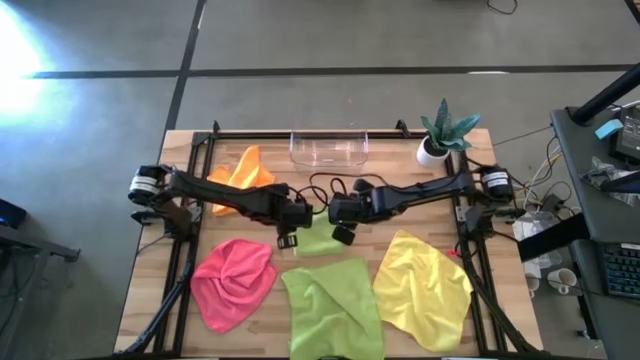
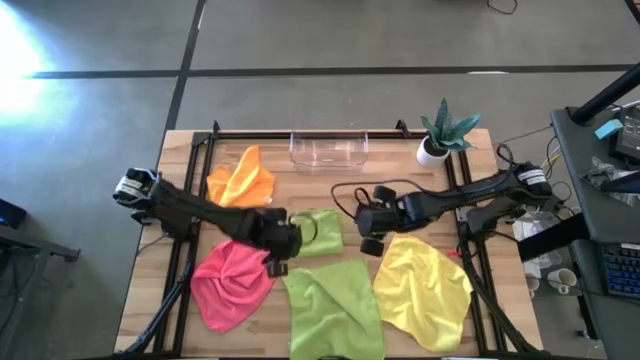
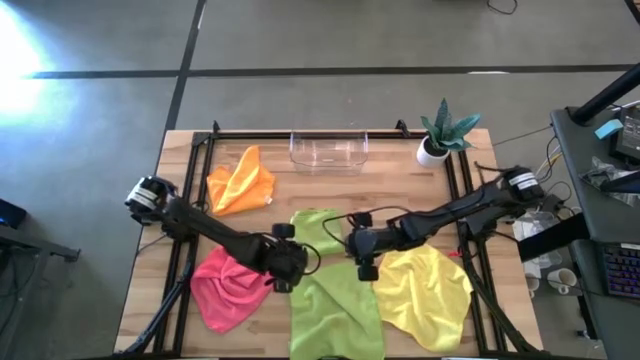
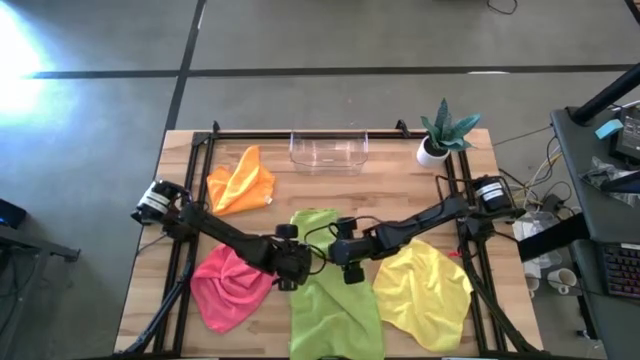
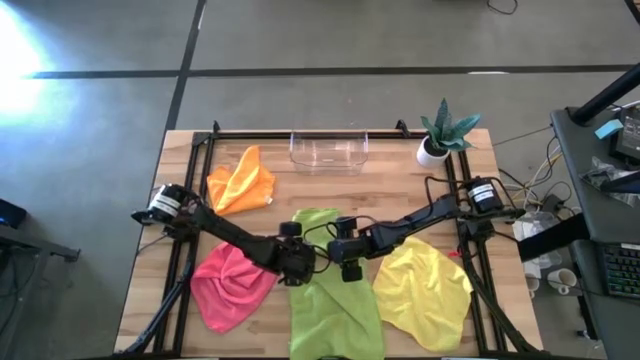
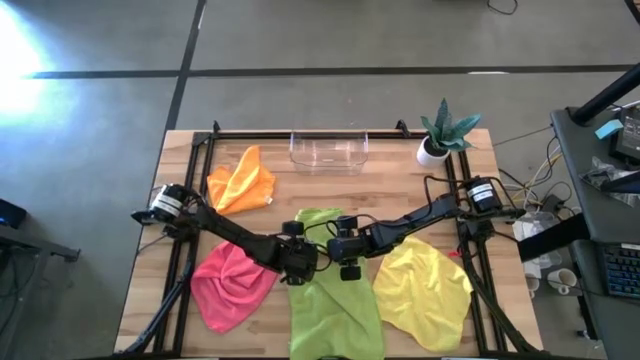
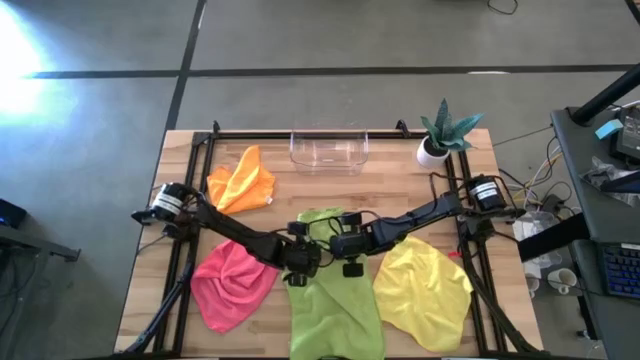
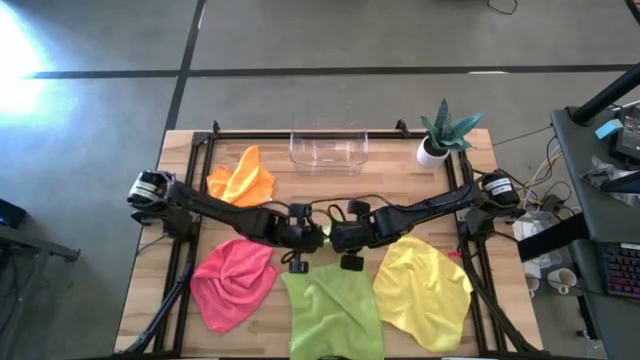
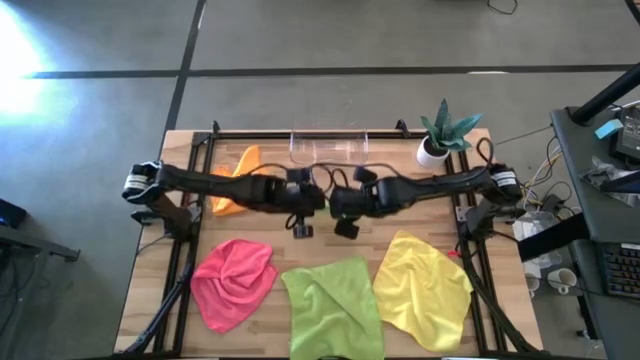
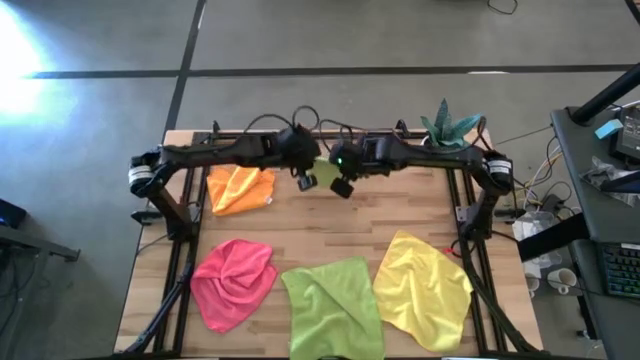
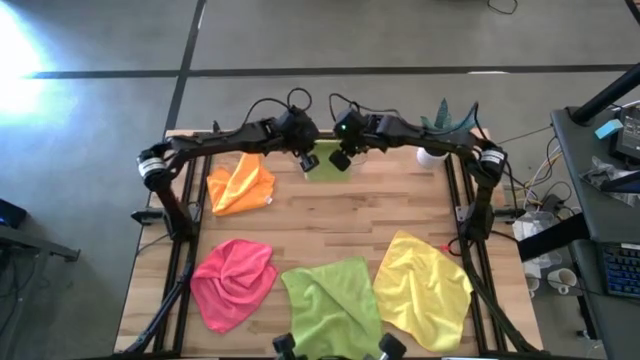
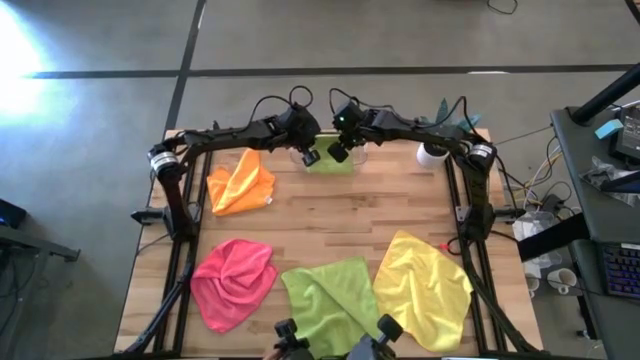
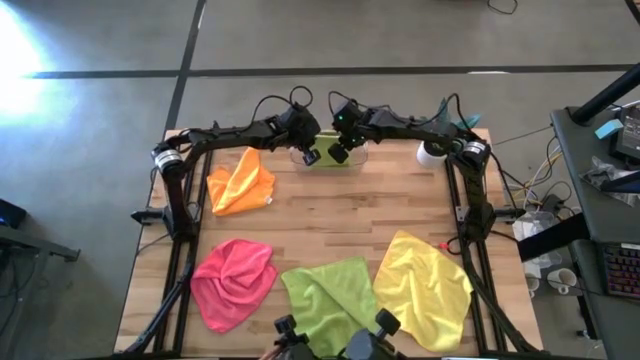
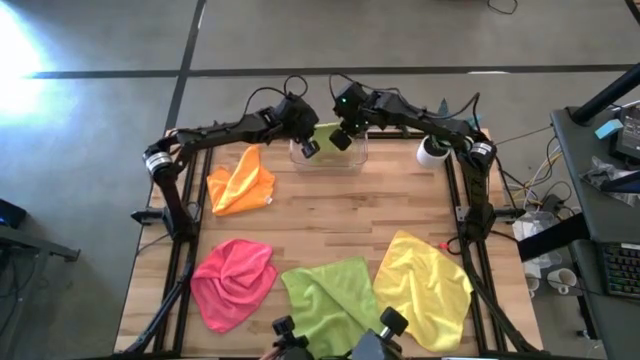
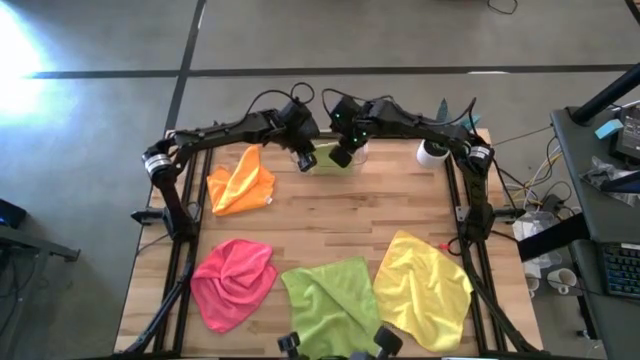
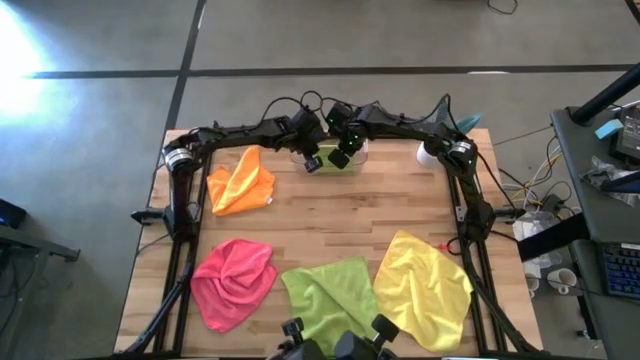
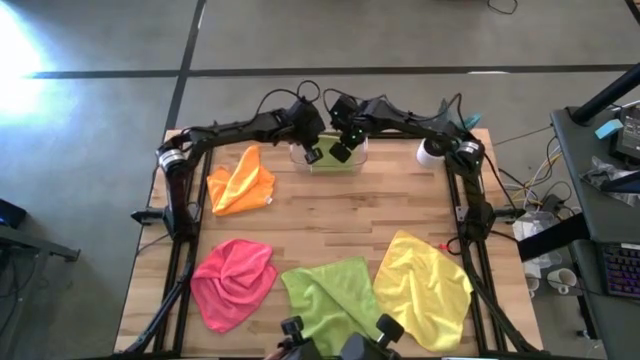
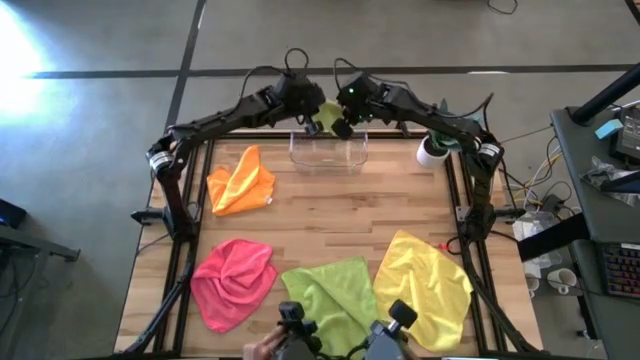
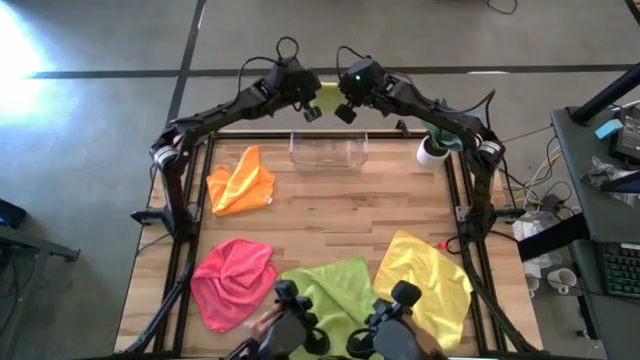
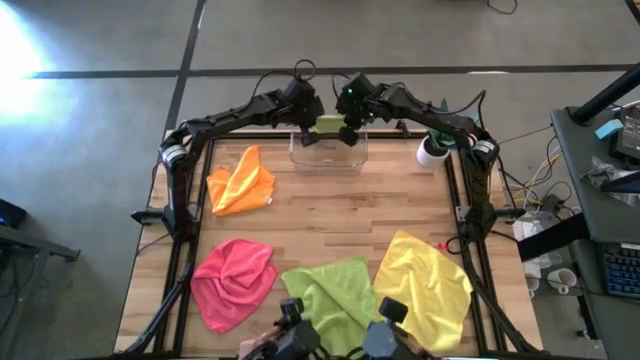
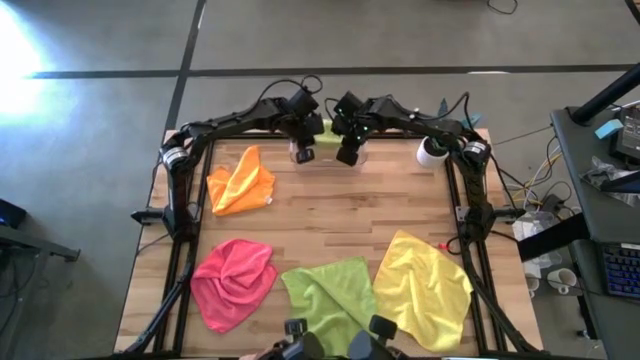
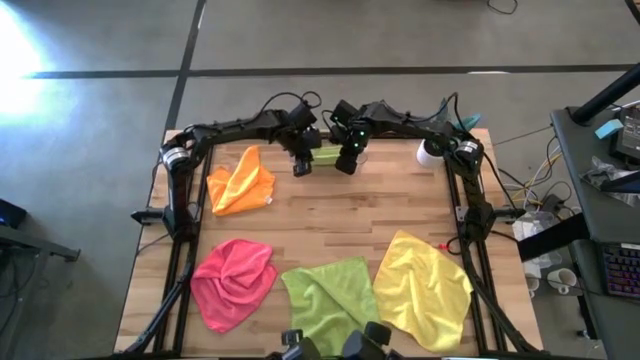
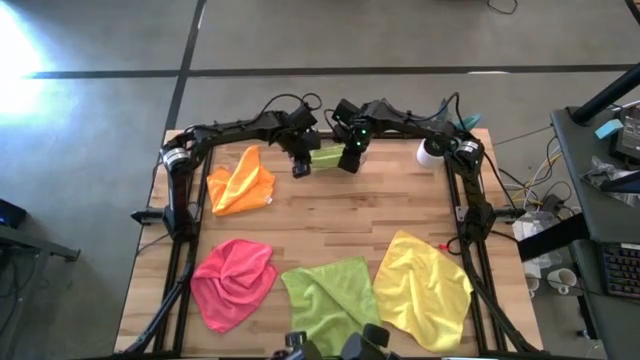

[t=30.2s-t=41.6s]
Task: Fold microfiber towels
Put the top green microfiber towel into the transparent bin

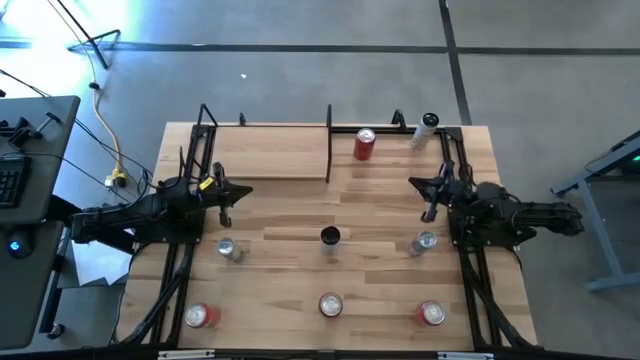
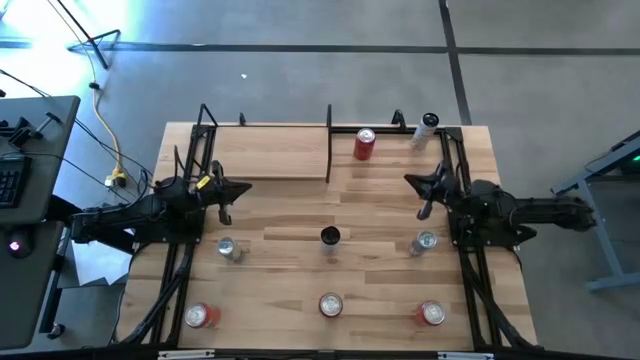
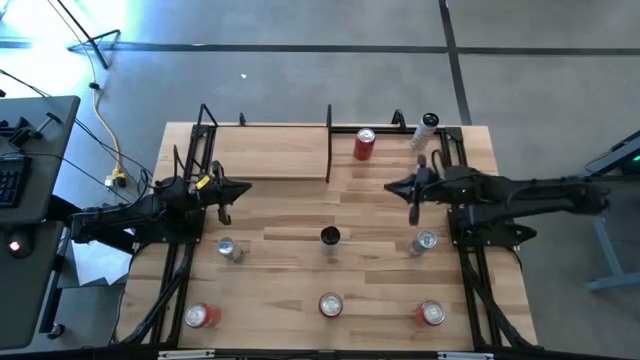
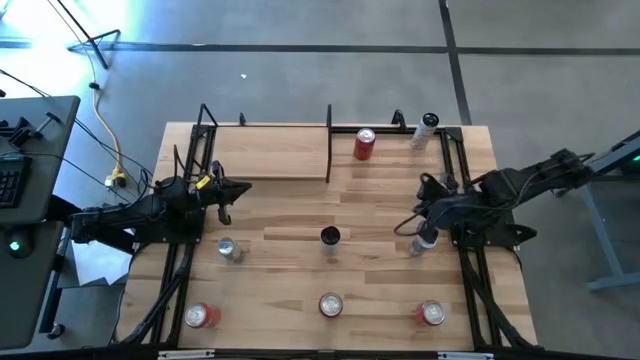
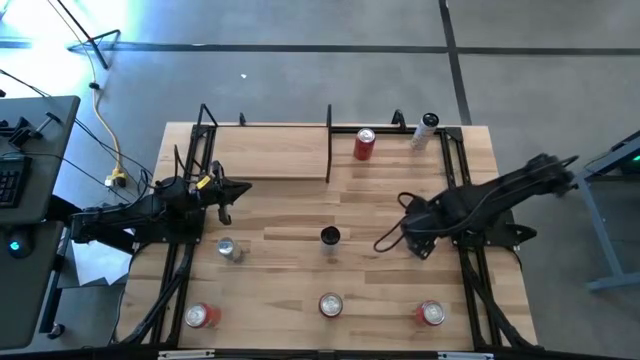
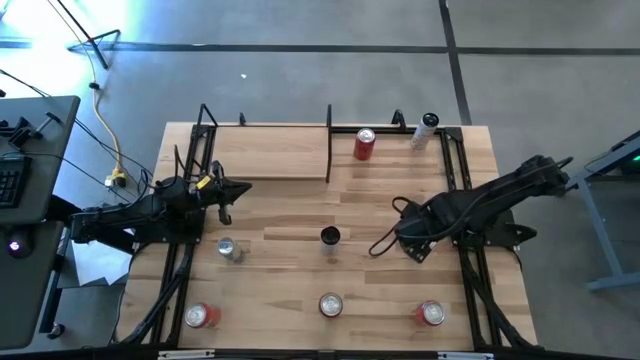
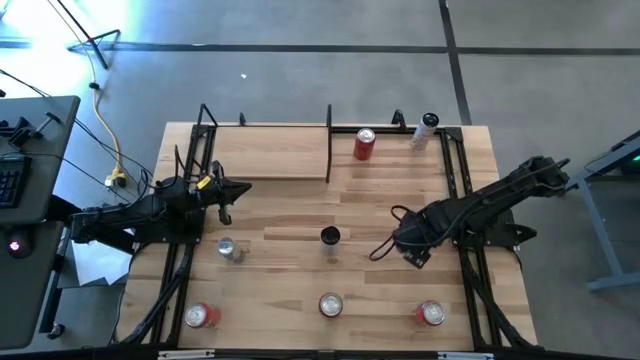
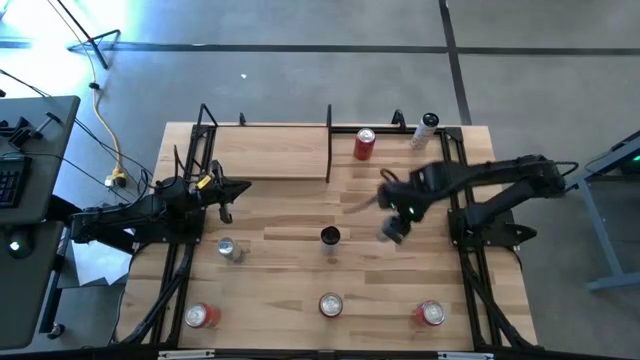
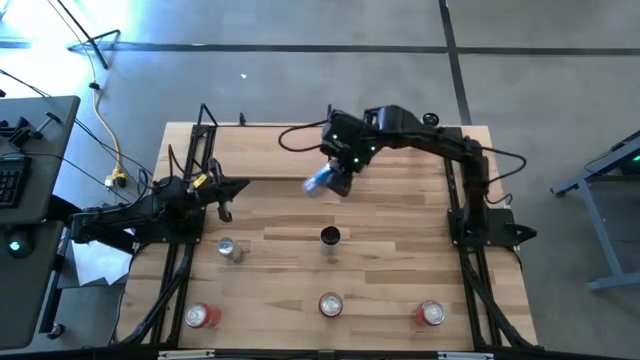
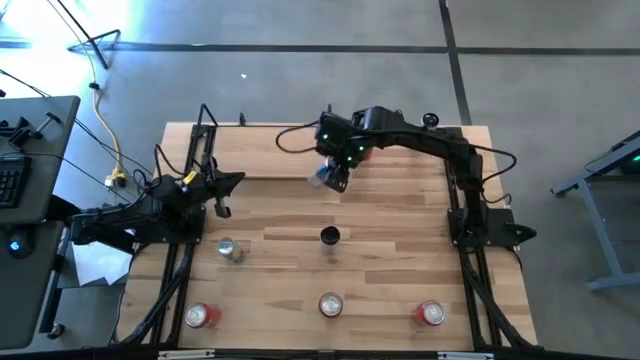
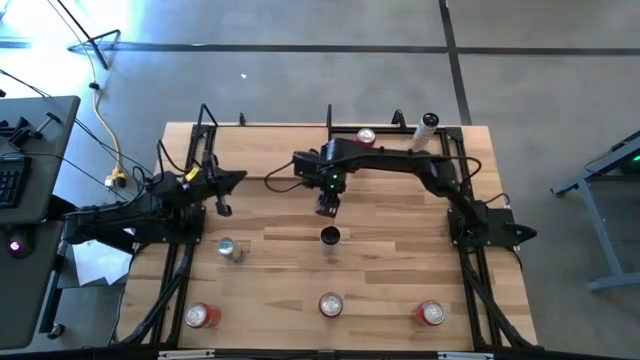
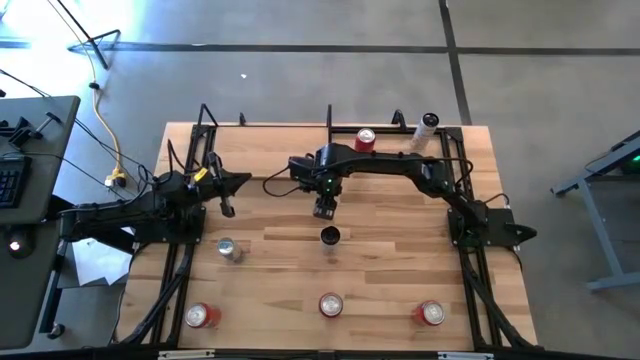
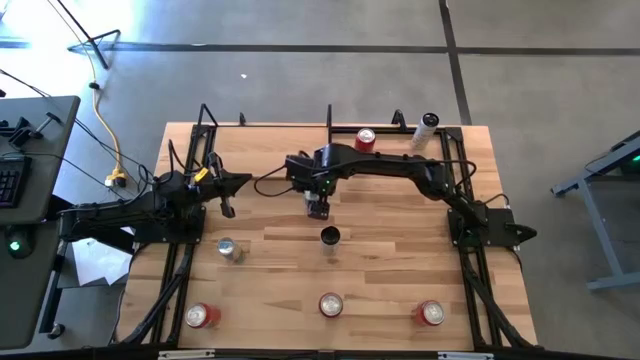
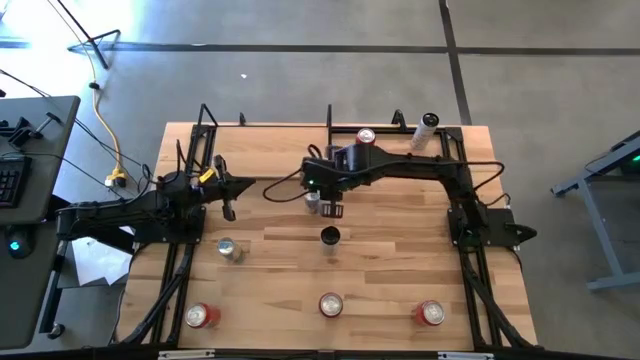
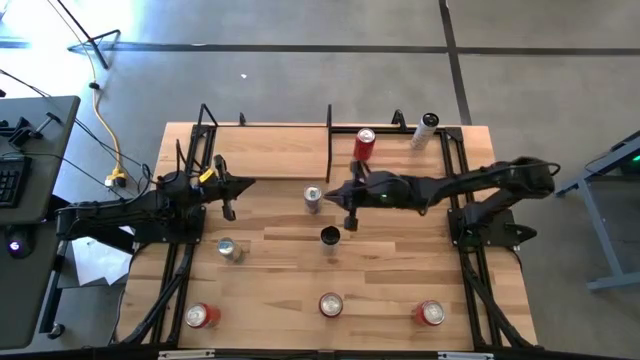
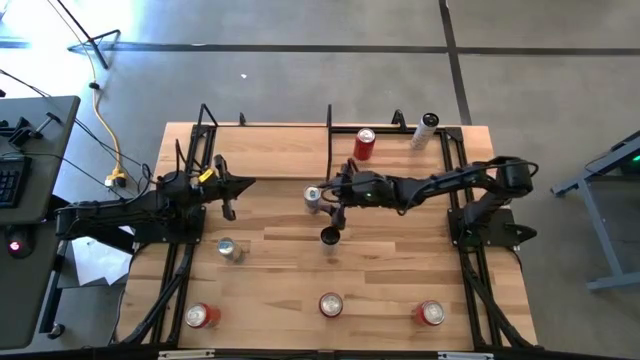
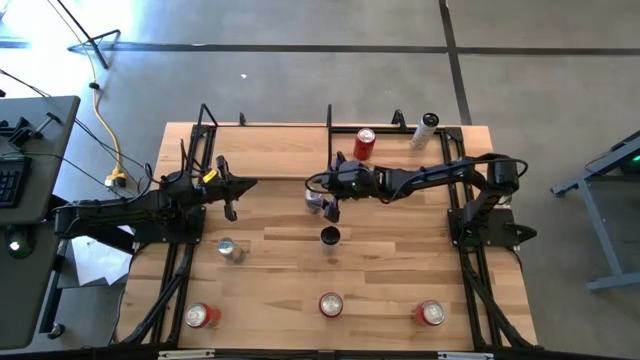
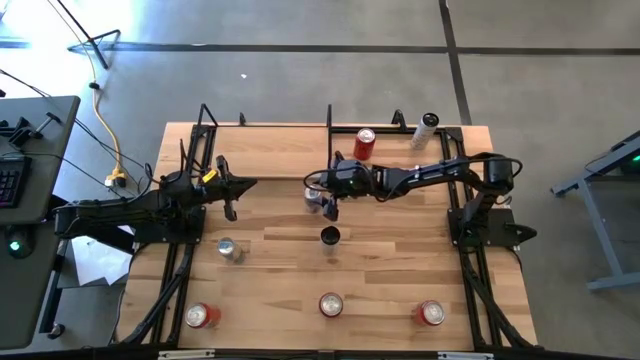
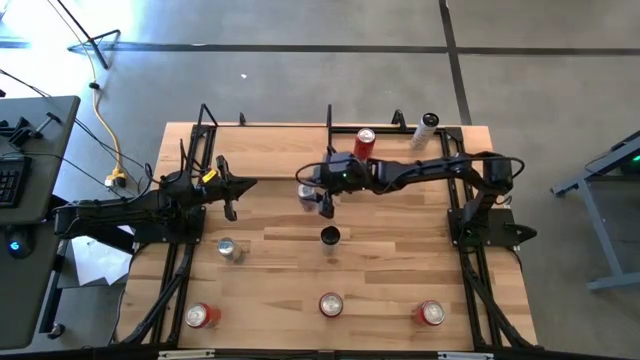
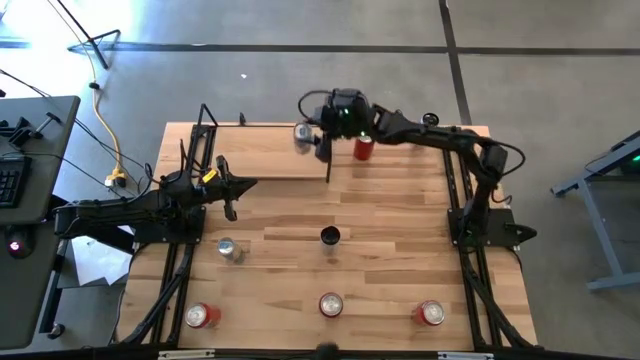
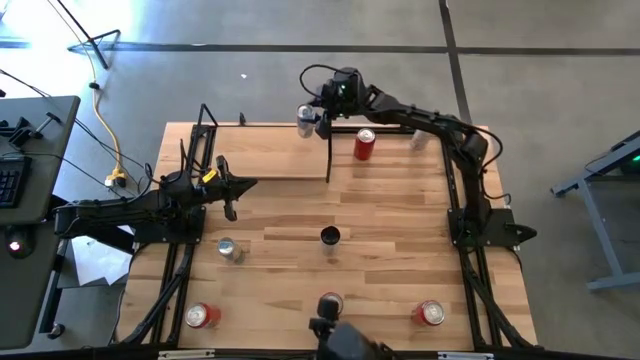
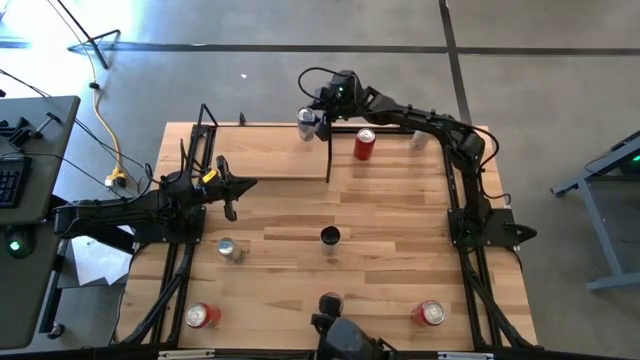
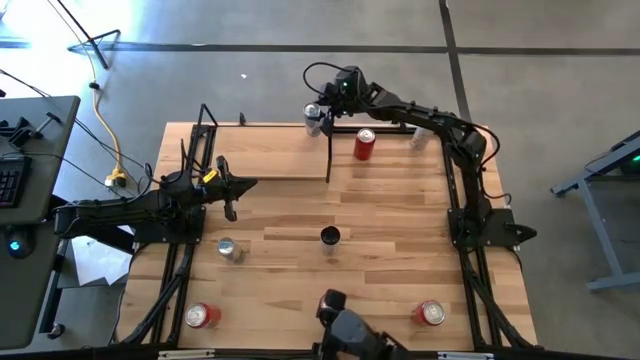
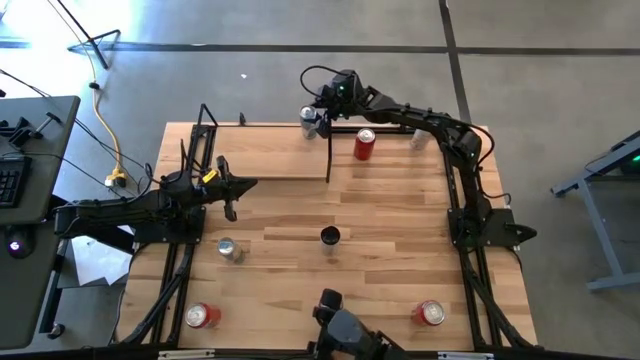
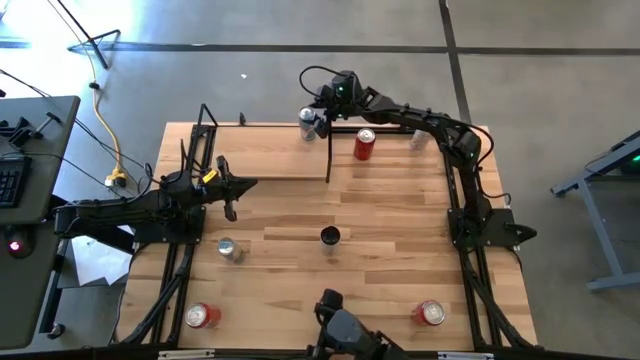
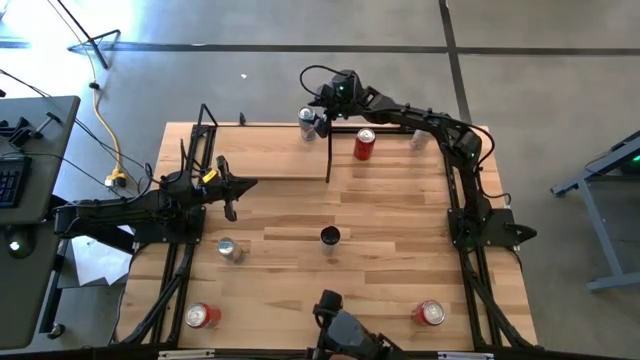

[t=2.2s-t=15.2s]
Task: Place canned beverage on shelf
Put the right blue soda can on the shelf
